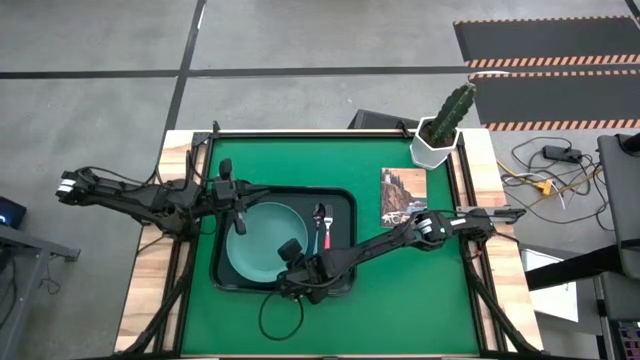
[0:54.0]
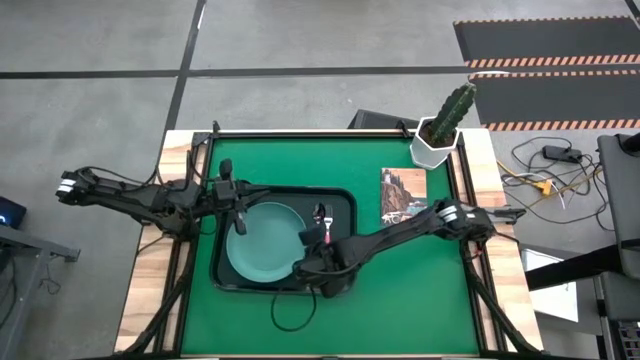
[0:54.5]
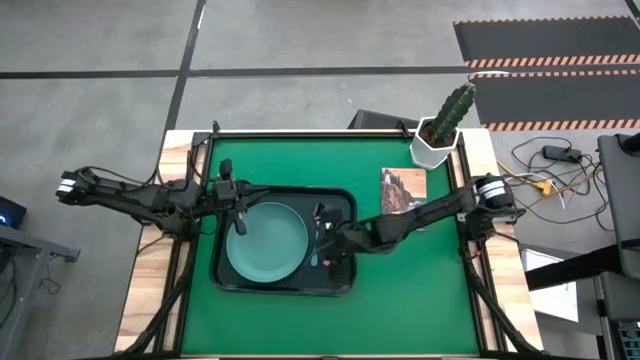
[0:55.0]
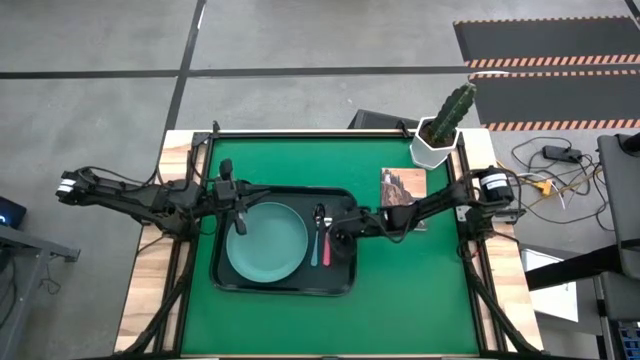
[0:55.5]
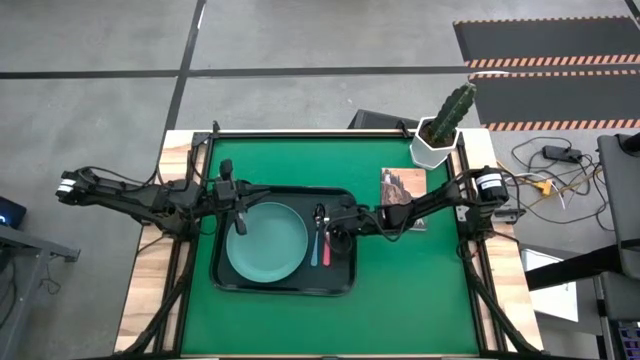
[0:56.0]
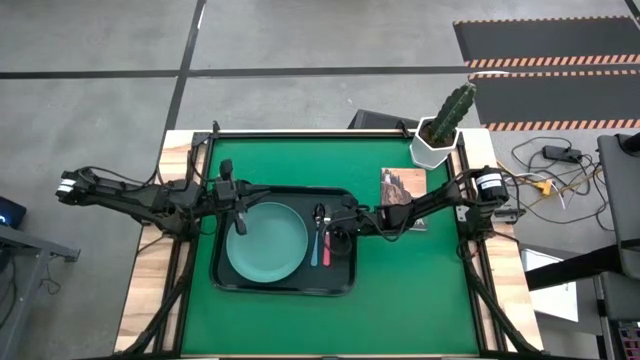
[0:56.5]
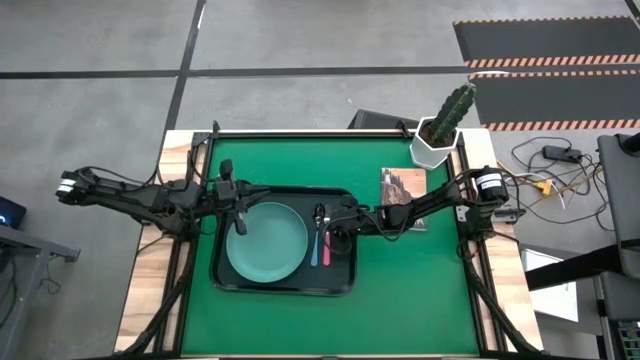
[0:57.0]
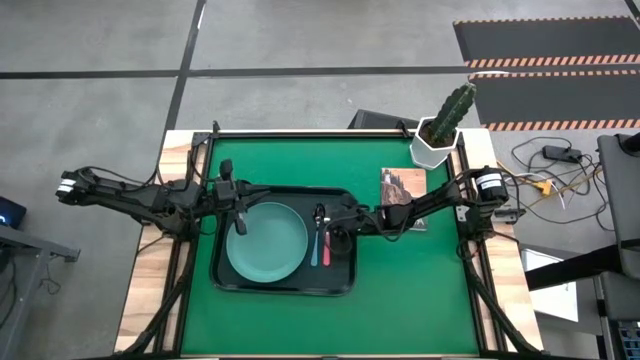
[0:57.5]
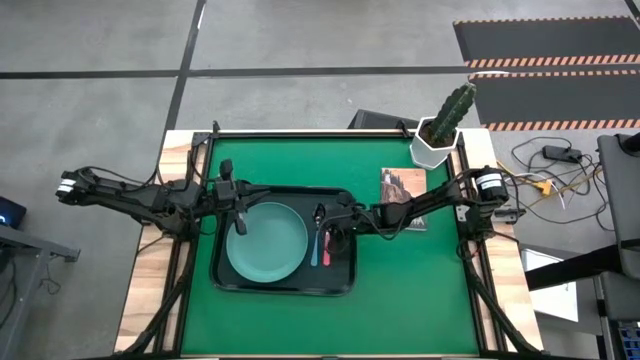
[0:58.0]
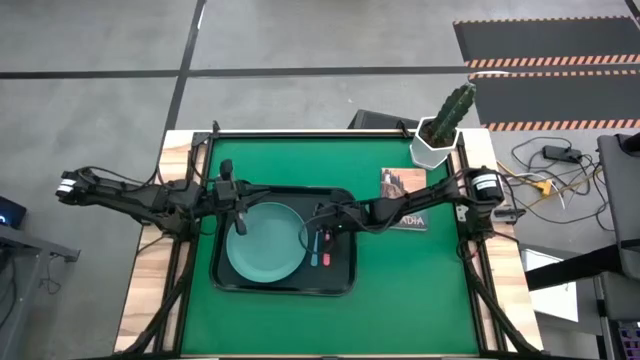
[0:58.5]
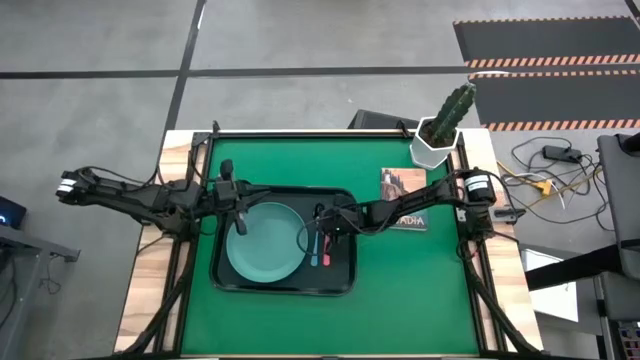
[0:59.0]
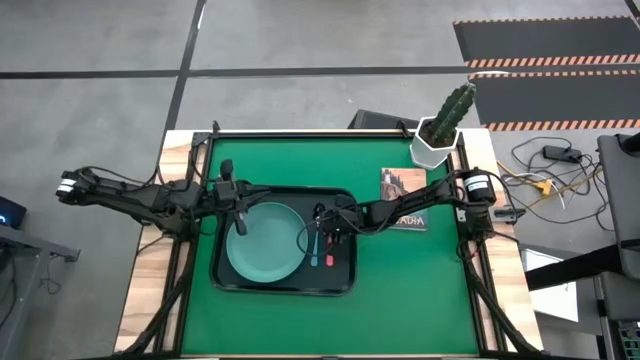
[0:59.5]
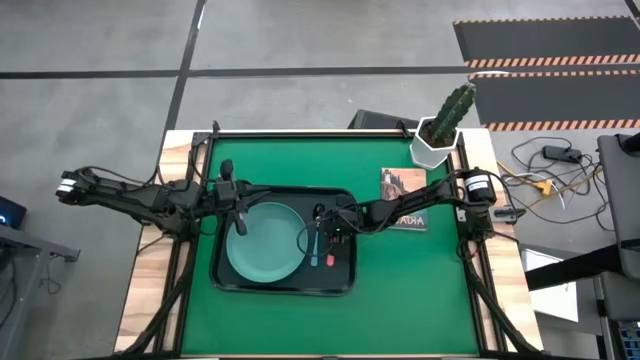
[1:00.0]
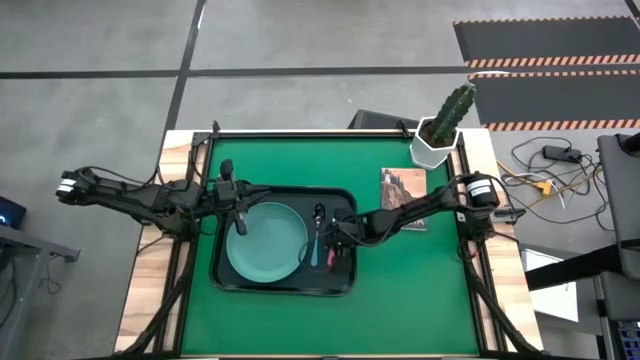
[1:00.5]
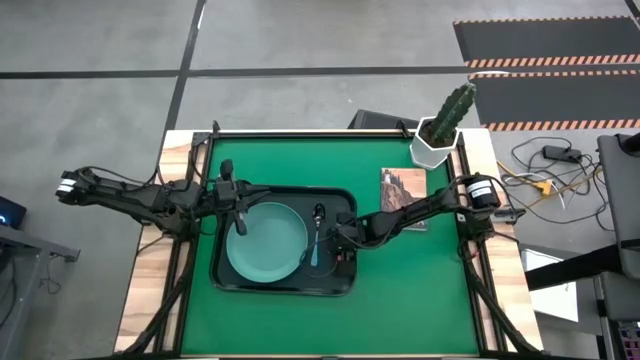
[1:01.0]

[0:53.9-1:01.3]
Task: Pick and place plate/cup/fork/spoon on tray
Adjust the pink fork on the black serving tray

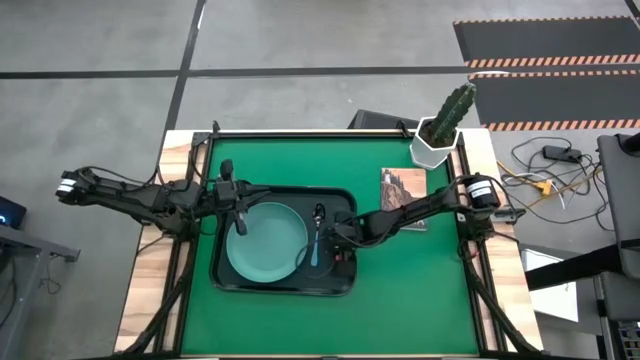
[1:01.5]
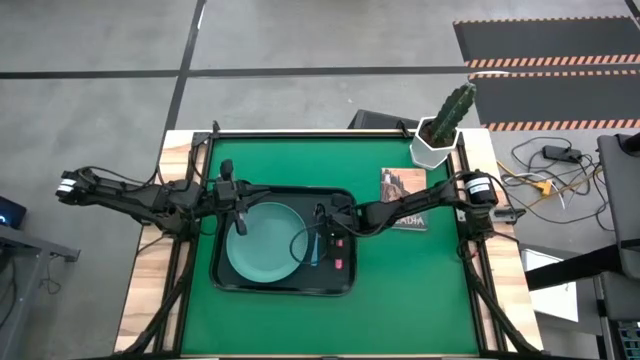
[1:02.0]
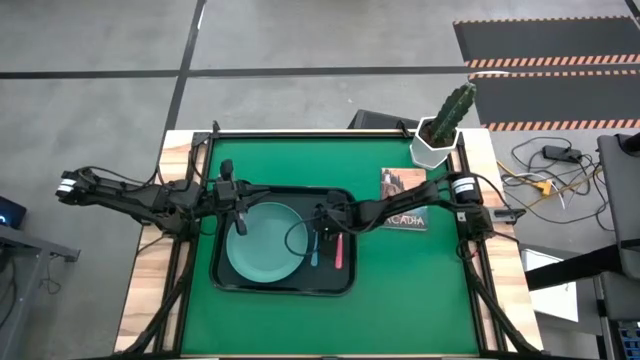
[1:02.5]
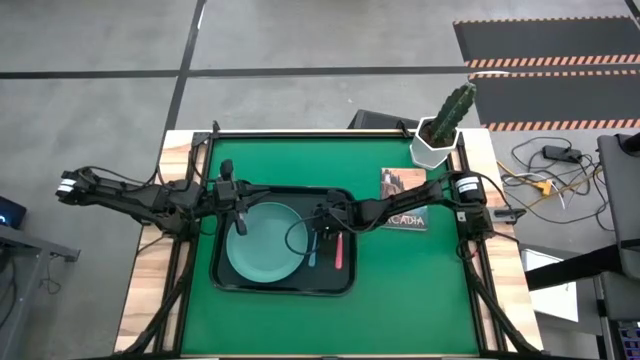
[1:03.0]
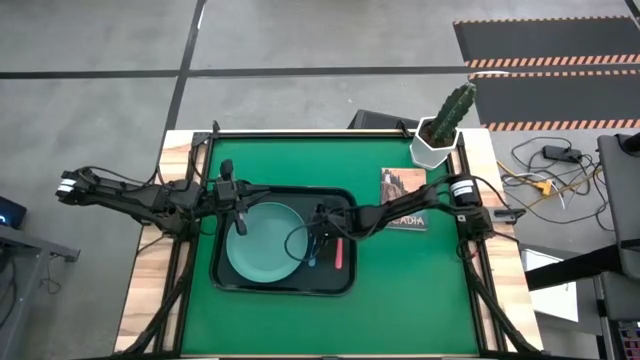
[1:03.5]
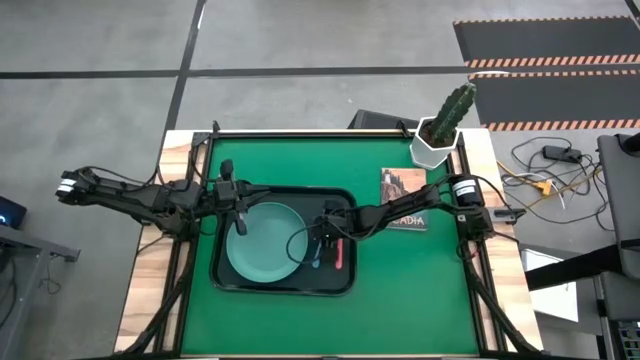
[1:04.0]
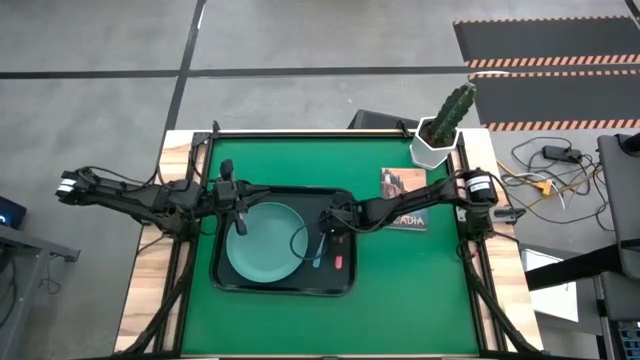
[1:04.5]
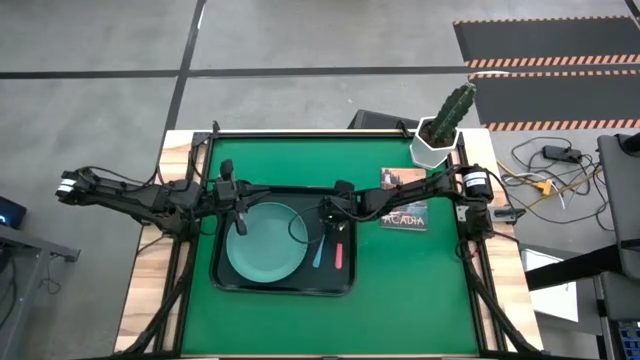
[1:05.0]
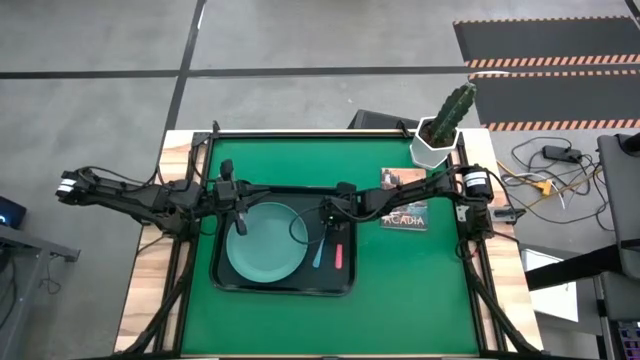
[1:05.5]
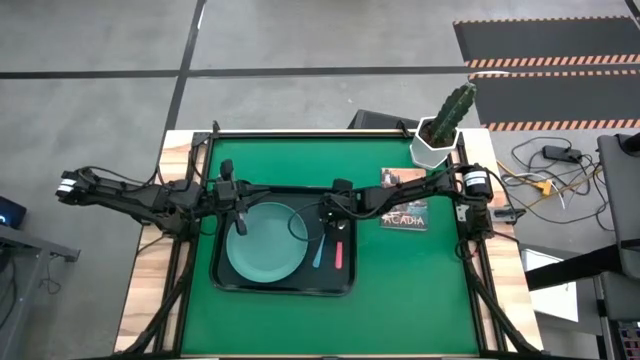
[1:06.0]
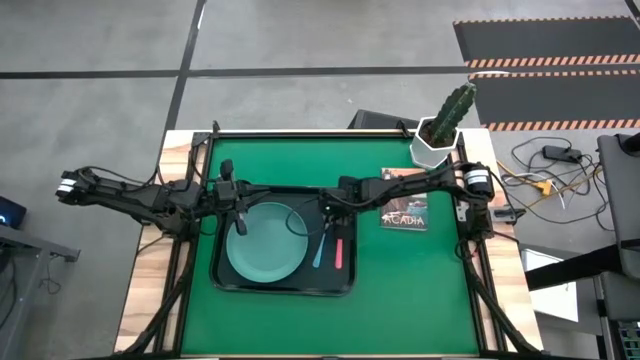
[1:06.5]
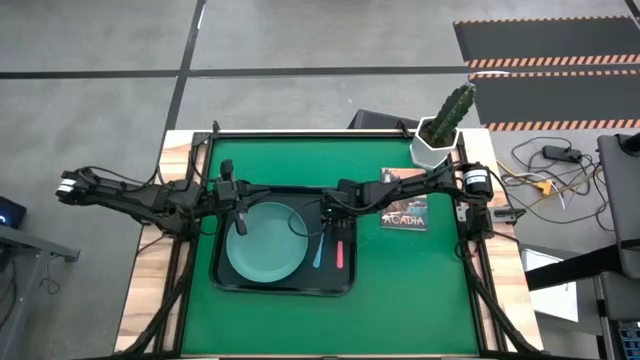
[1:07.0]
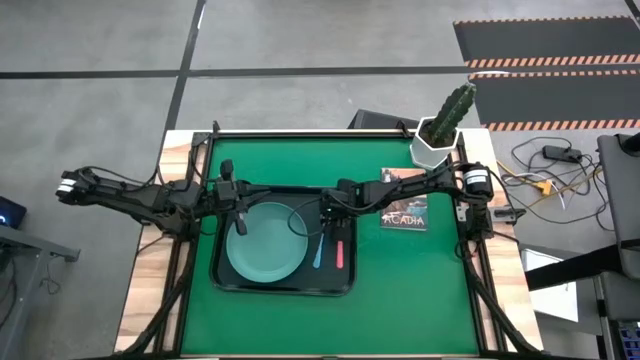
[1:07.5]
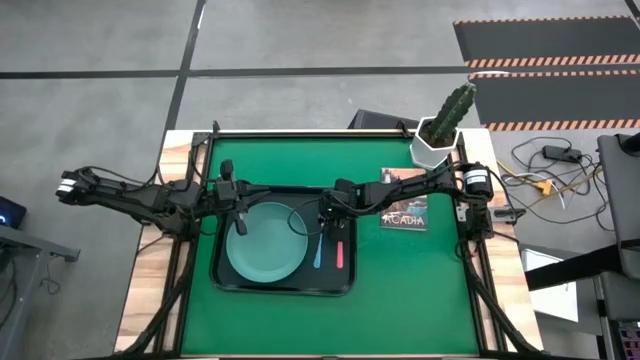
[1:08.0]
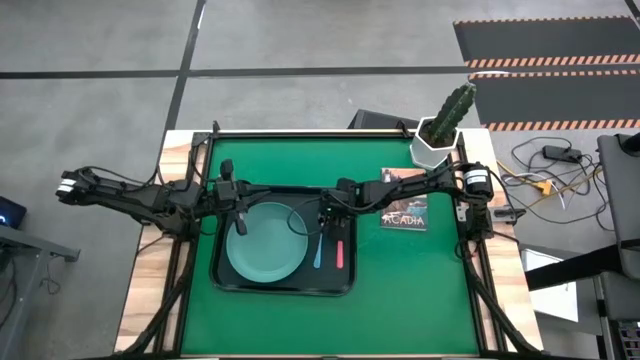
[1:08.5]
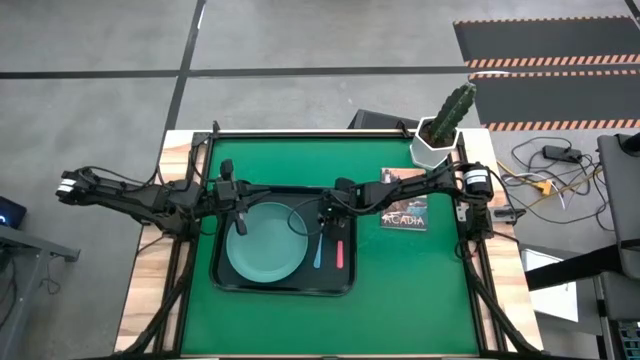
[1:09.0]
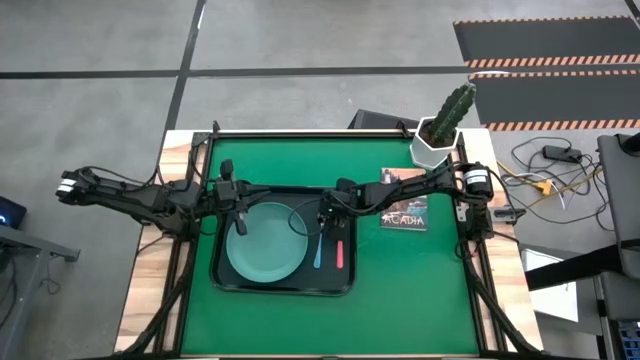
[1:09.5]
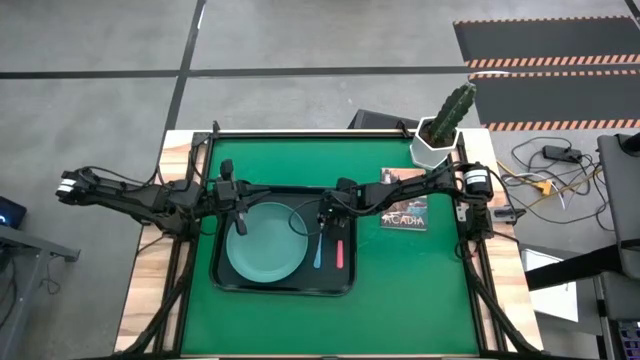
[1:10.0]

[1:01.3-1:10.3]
Adjust the blue spoon on the black serving tray

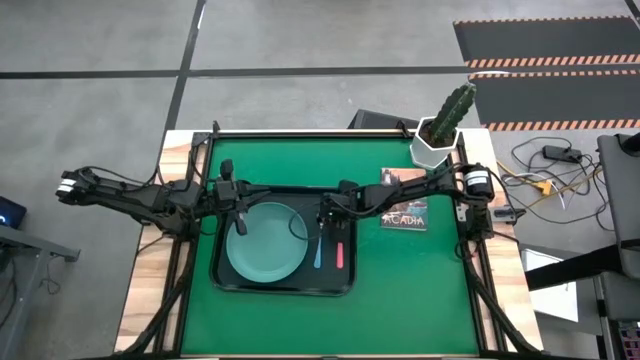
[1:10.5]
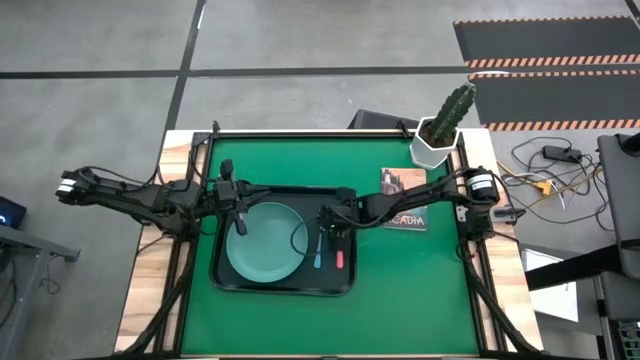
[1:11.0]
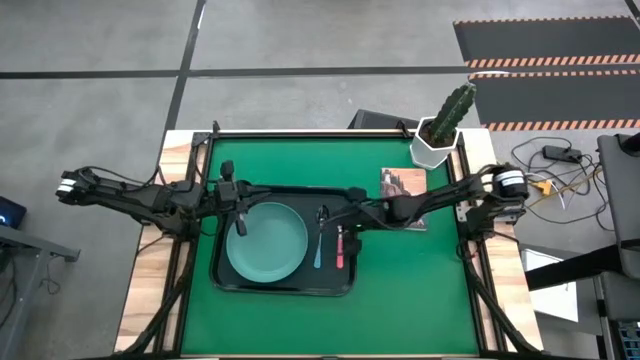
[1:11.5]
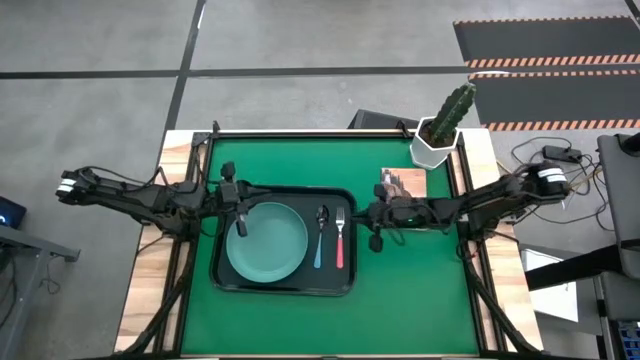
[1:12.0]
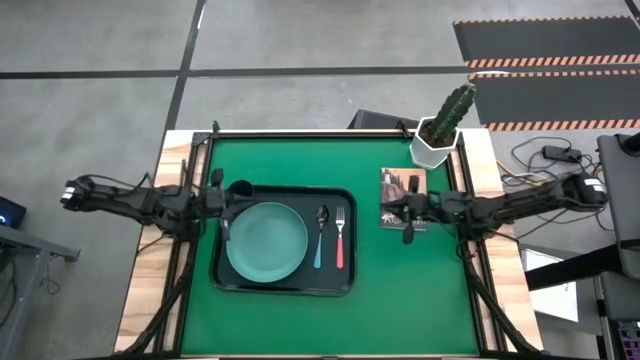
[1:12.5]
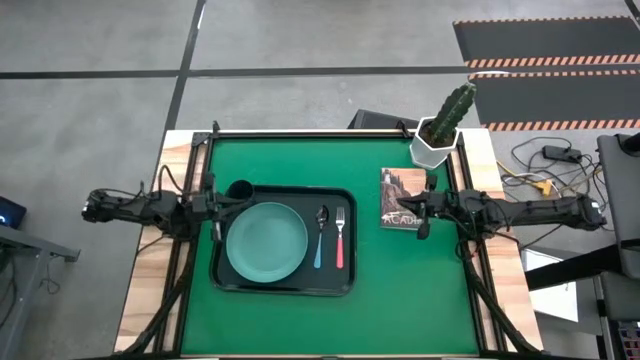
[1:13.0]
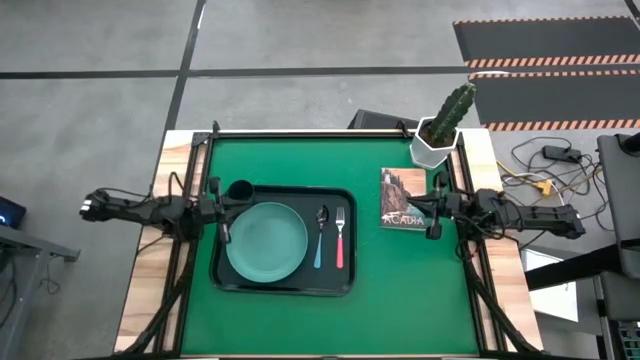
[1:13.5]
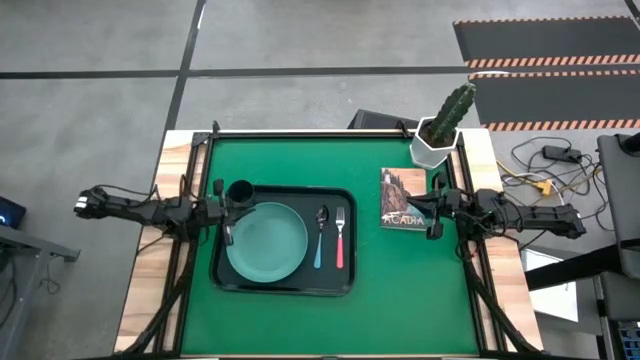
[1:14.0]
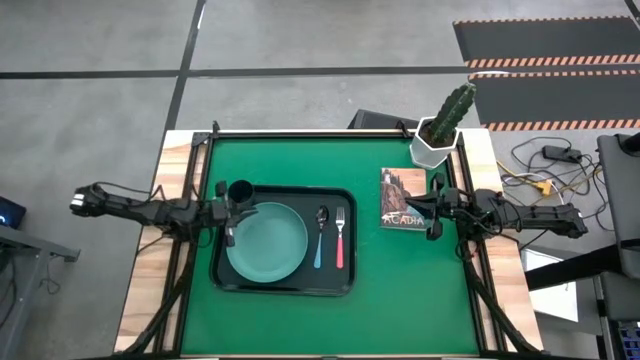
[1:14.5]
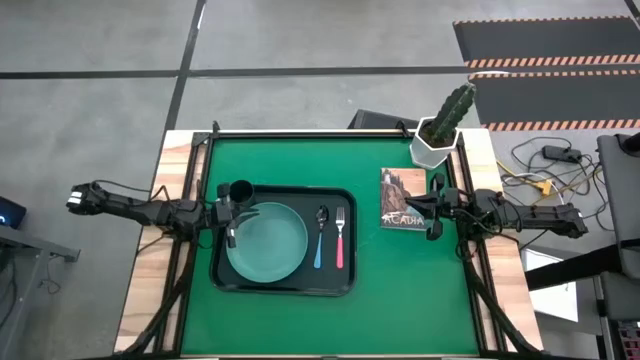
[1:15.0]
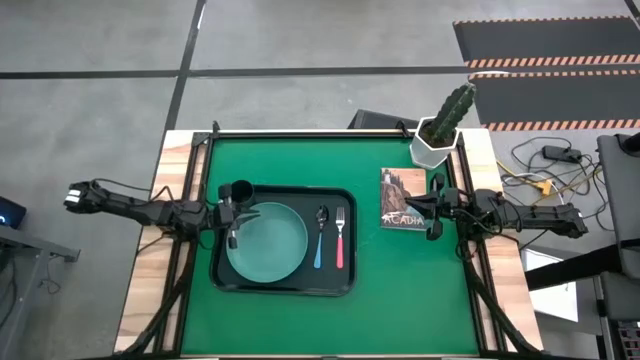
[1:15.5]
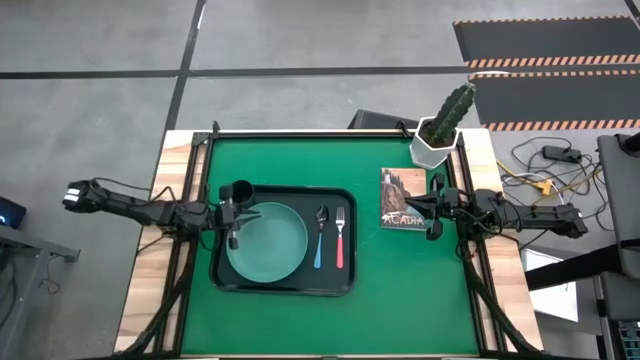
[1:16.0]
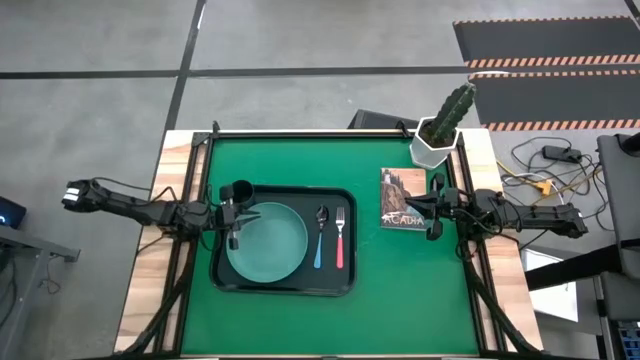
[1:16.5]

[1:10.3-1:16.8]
Return to Home Position
